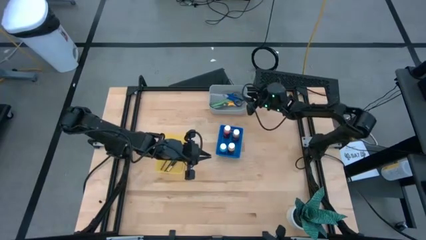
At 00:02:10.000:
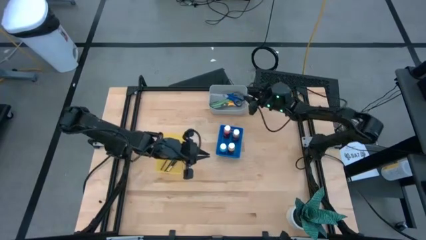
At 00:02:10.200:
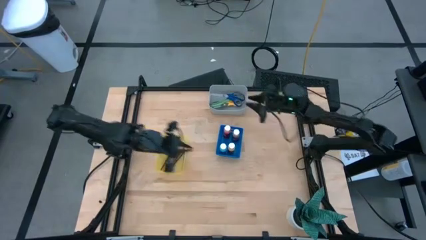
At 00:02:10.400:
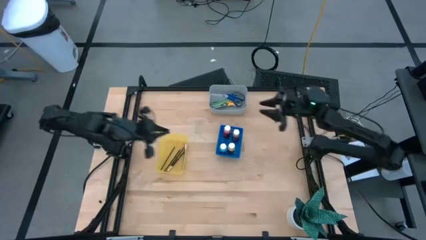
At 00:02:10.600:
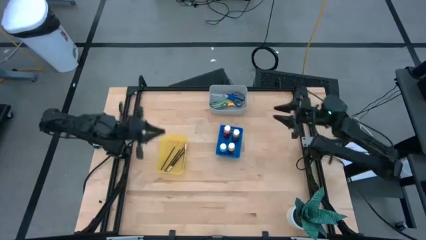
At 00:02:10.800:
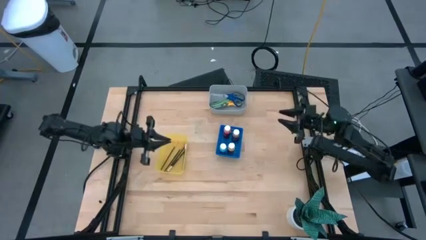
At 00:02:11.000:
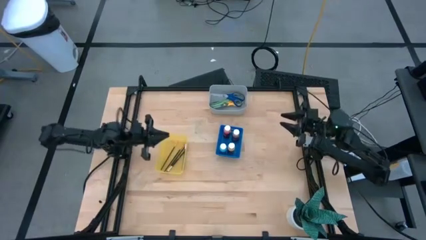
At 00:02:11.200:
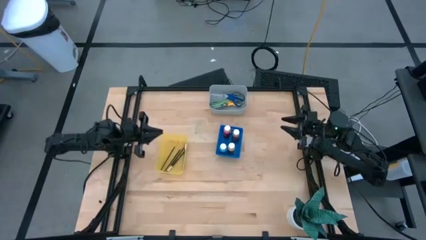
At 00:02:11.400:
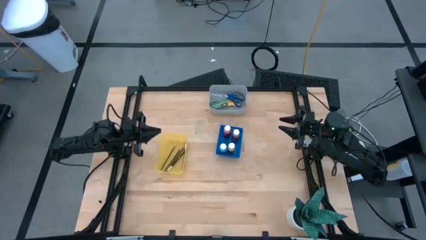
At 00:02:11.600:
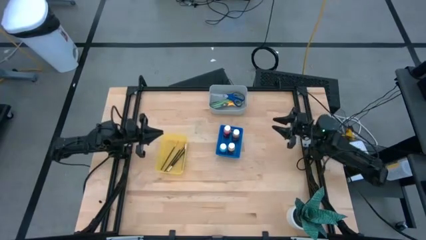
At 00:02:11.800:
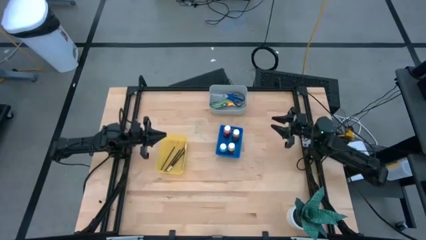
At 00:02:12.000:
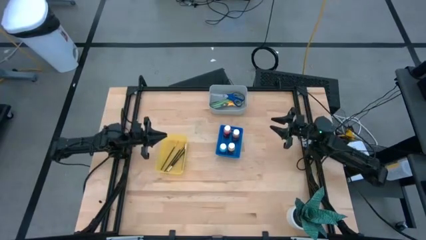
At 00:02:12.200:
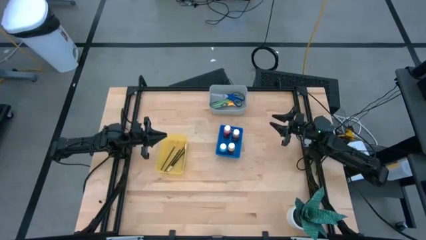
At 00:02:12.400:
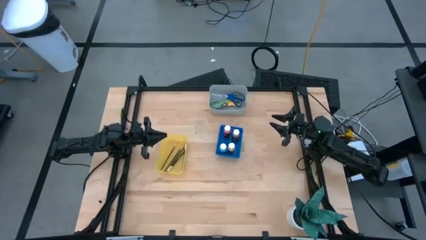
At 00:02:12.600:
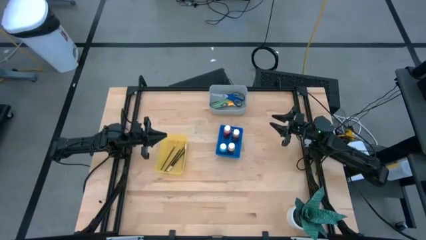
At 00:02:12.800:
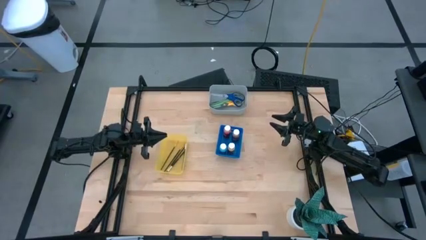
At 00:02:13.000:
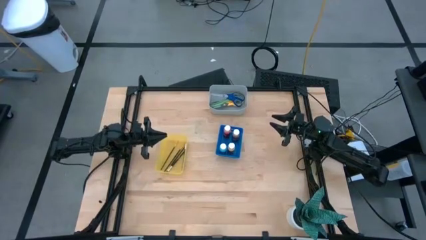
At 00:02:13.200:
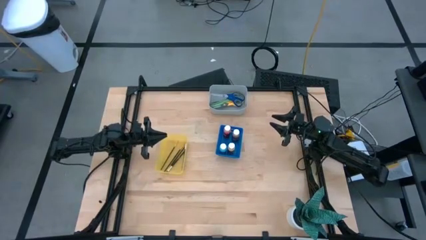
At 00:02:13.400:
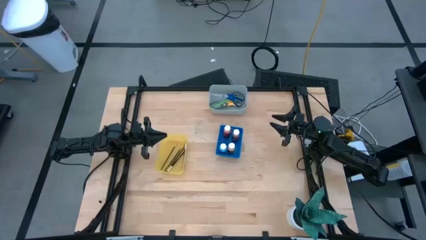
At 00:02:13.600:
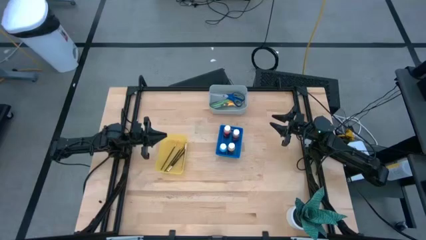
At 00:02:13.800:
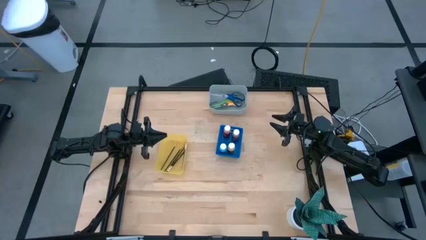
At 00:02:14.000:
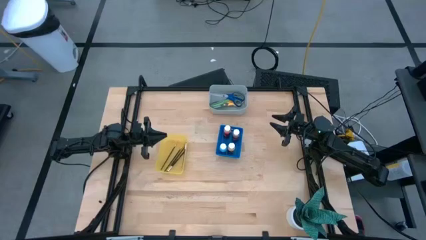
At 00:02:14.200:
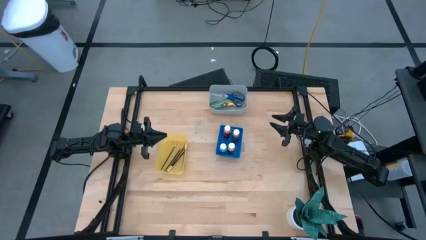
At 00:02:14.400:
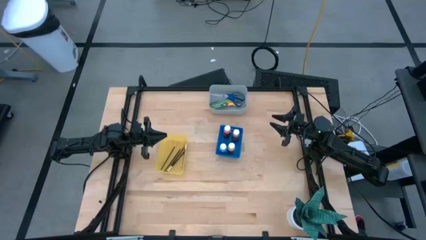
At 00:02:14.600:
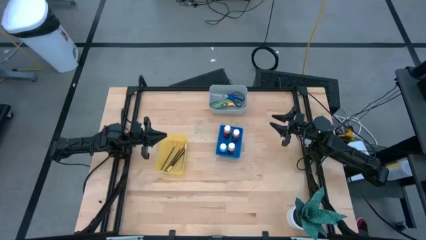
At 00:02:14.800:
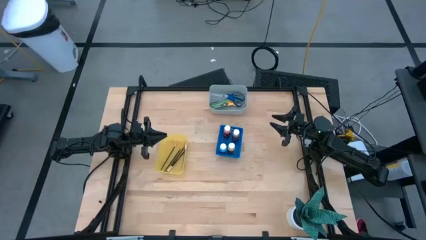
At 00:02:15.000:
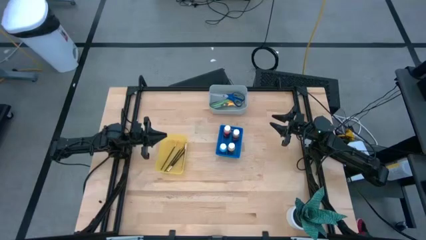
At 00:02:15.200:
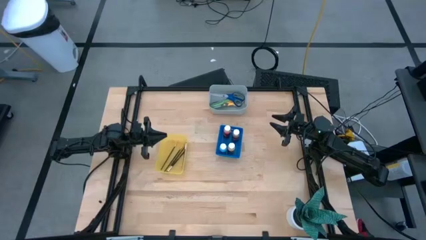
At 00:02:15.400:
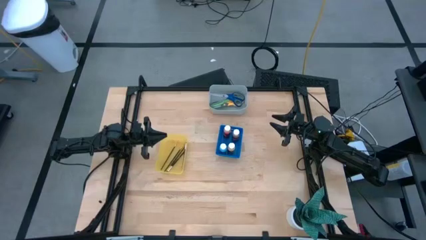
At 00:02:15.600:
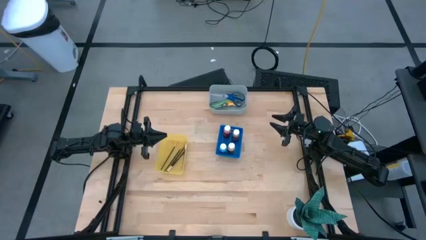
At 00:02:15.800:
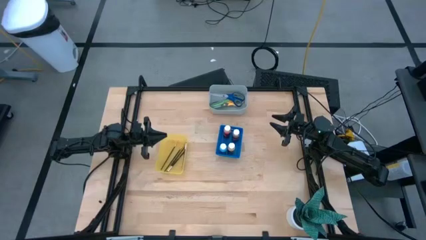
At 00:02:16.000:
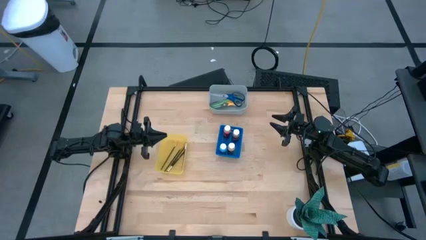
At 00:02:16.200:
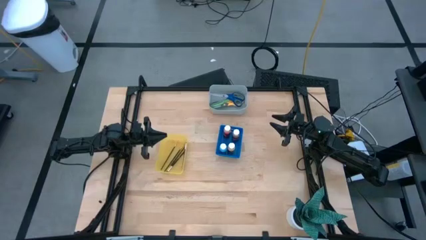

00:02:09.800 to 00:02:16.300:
Task: Pick & Place Paint Supplies
Return to Home Position

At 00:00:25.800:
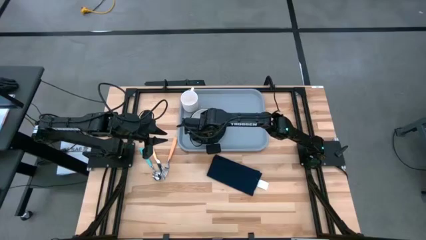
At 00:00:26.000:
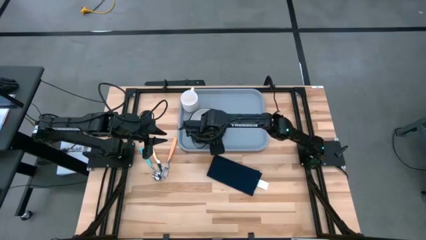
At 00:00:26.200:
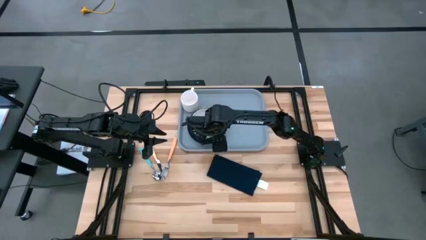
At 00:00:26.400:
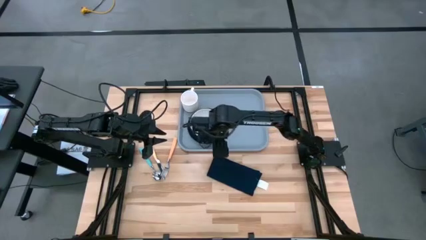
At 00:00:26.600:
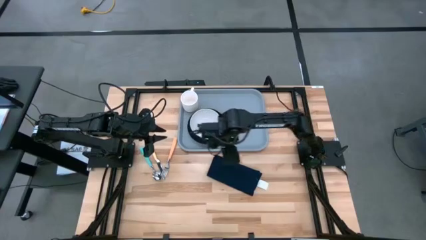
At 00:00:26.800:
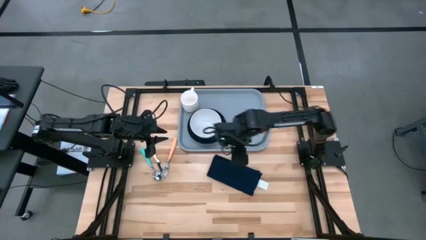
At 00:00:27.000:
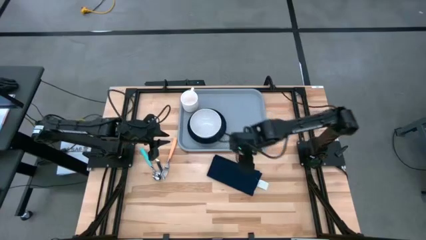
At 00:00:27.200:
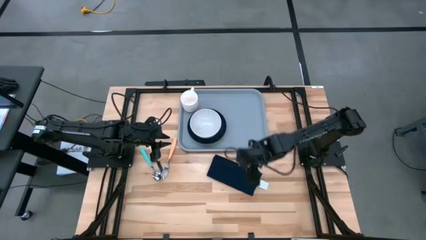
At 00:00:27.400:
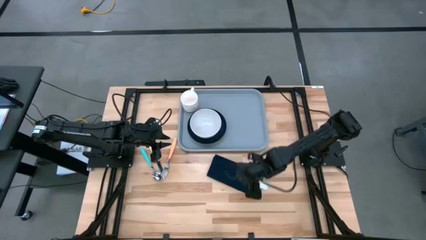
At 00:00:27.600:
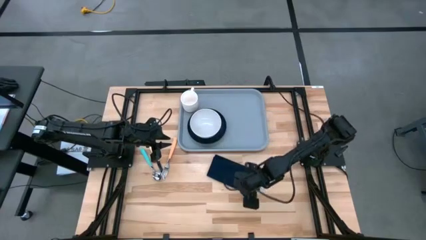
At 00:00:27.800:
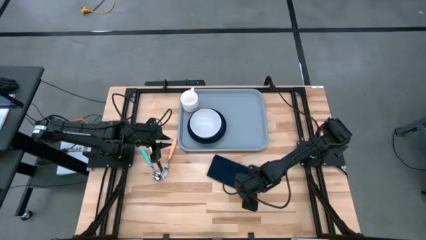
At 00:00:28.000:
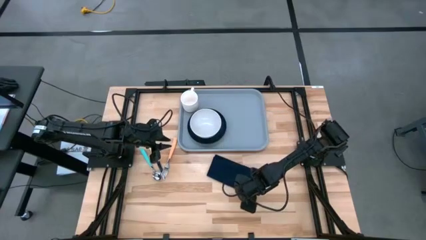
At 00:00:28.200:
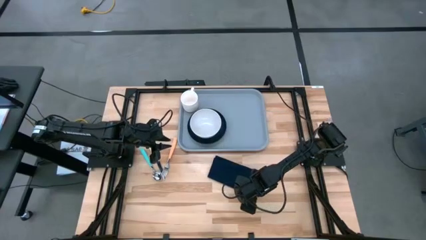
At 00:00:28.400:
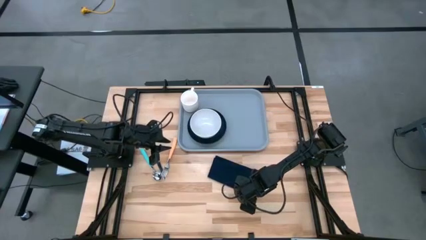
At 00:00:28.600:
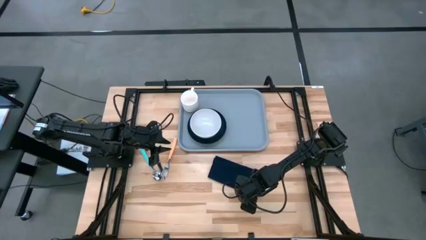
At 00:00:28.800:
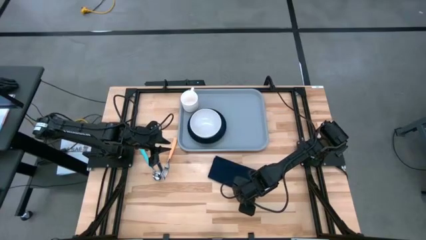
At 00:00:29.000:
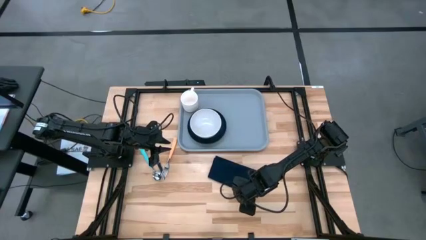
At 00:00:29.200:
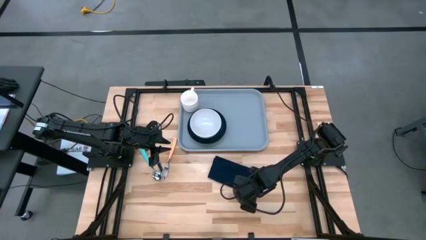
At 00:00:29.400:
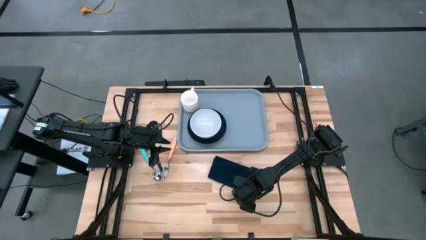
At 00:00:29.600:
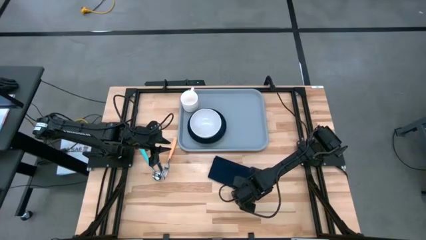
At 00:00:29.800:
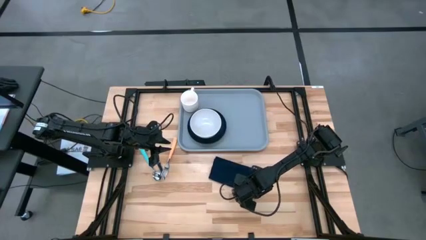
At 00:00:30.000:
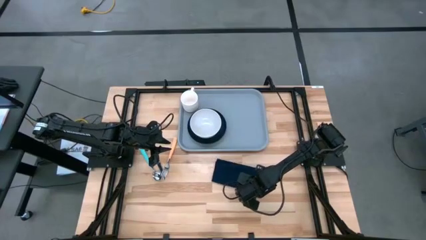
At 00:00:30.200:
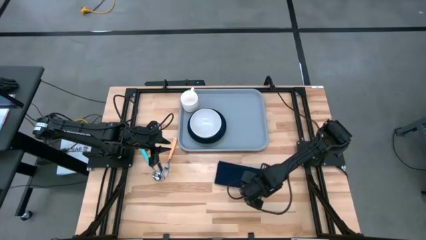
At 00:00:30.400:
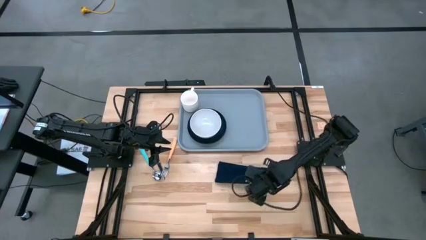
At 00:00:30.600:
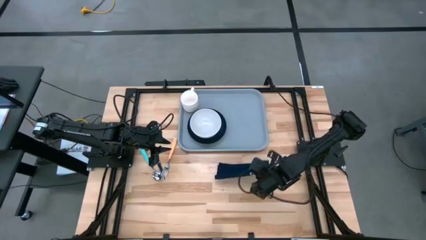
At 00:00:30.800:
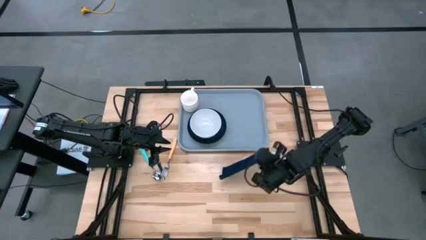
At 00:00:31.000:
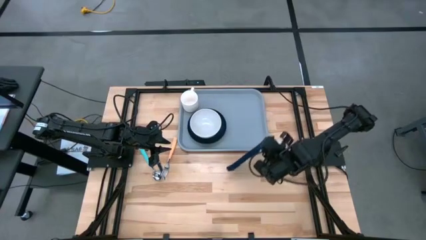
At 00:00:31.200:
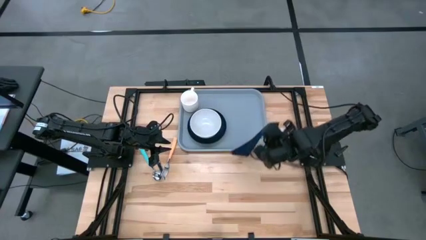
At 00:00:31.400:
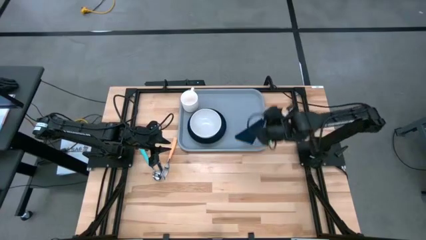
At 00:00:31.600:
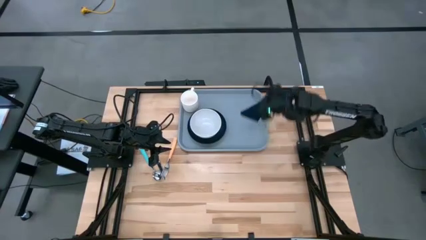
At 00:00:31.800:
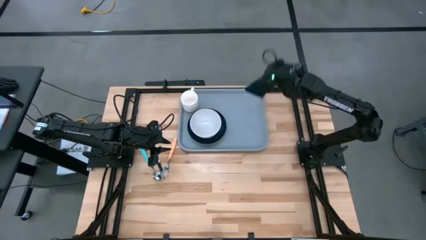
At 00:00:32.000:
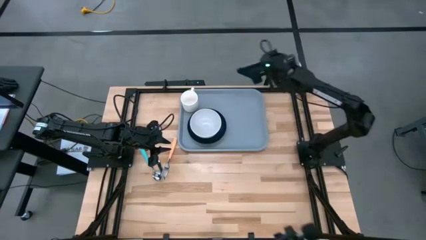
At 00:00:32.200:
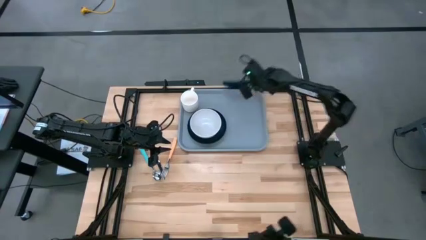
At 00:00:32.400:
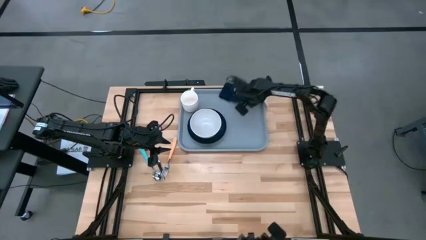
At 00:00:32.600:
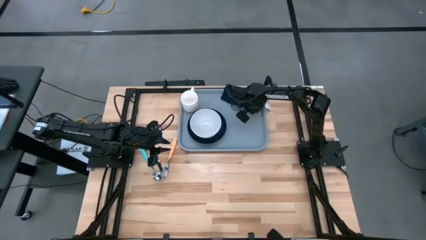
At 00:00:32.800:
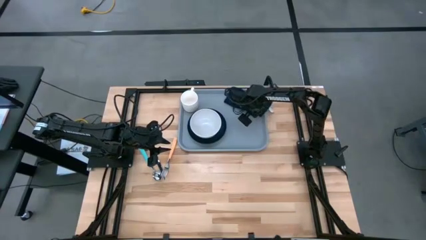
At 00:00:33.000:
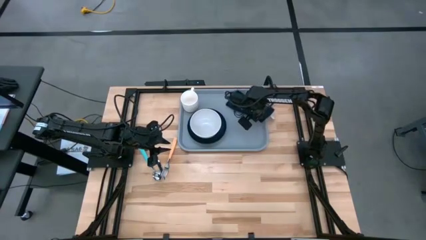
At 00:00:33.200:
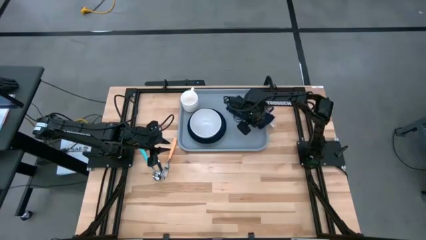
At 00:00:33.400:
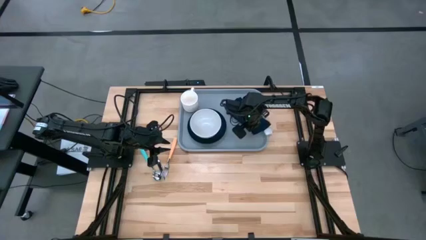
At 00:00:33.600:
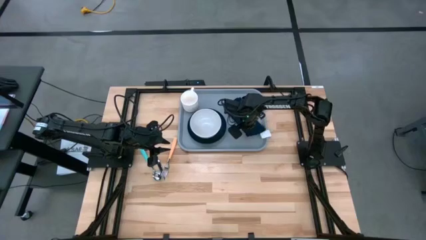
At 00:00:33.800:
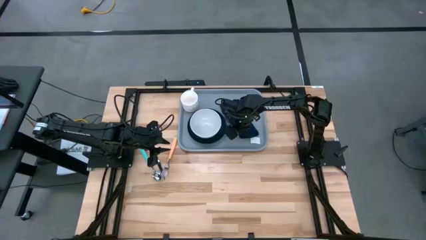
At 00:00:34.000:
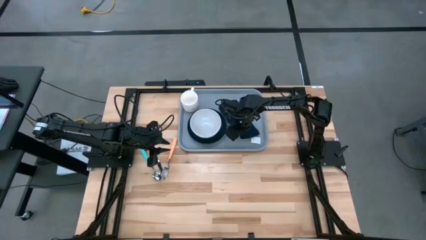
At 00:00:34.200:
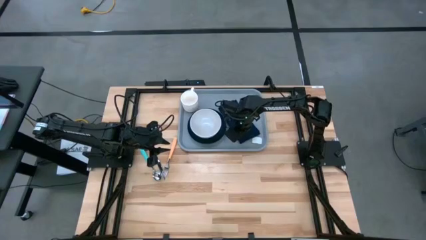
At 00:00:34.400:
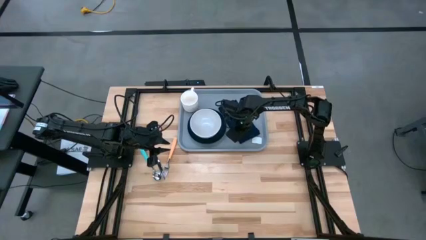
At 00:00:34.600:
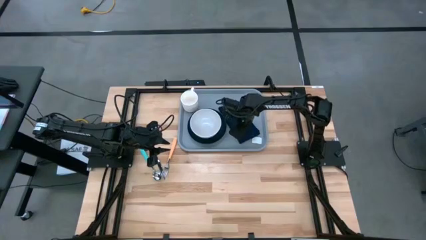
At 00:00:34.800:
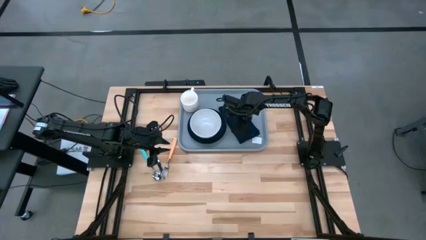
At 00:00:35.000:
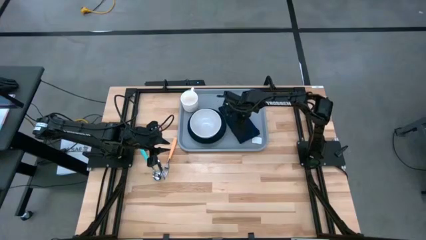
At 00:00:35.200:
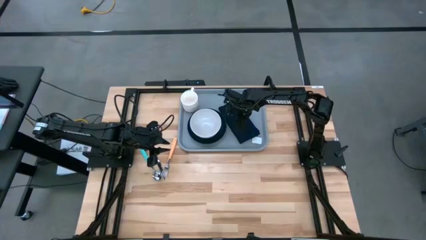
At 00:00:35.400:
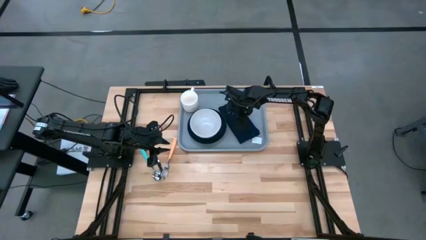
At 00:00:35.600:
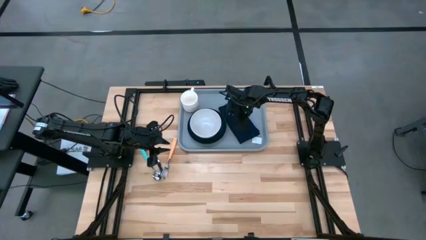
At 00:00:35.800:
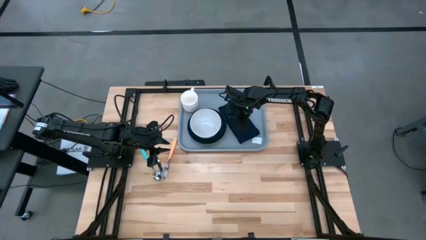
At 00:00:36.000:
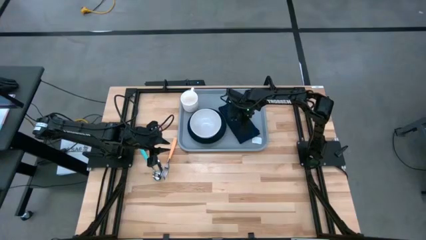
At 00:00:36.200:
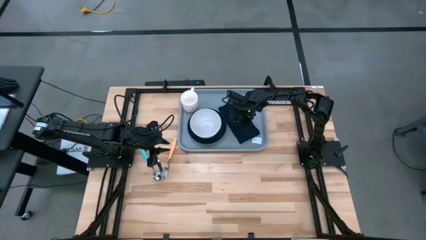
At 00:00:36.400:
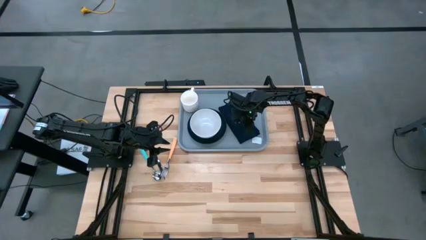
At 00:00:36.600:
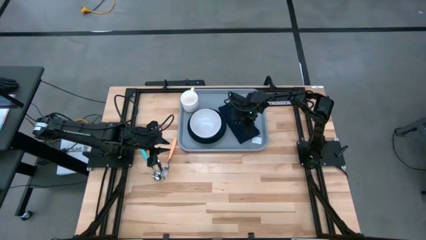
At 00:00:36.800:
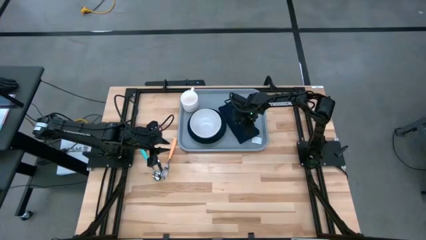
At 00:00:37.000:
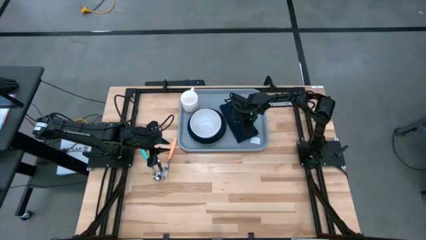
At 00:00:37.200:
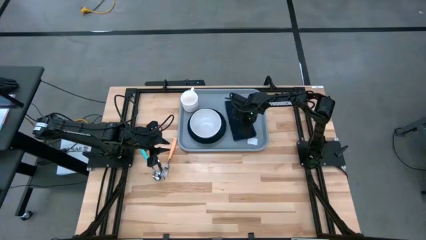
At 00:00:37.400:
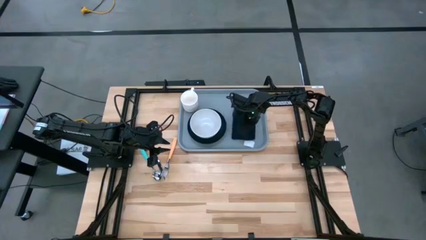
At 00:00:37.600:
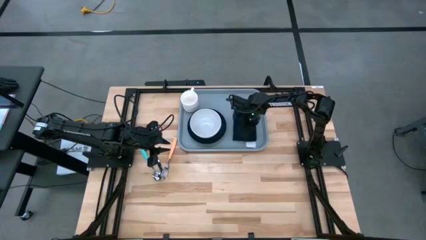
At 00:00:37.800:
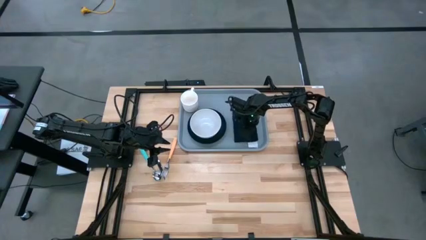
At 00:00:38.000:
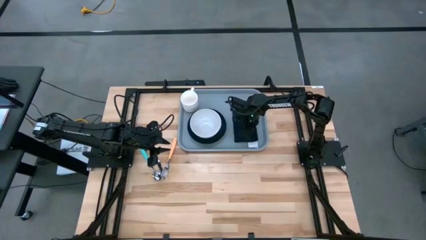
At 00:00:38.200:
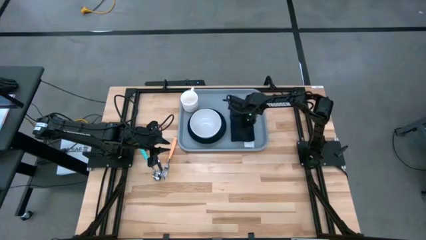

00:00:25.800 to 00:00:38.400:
Task: Set up tray
Put the dark blue table napkin to the right of the dark blue plate on the gray table tray
